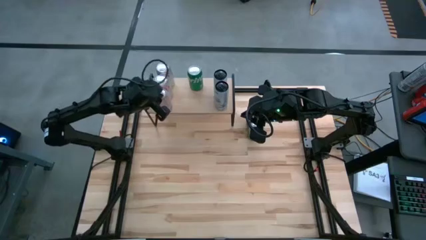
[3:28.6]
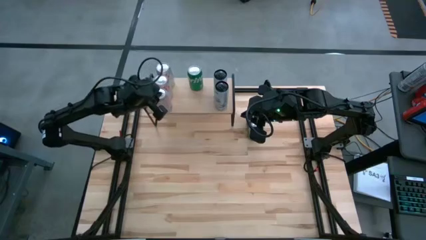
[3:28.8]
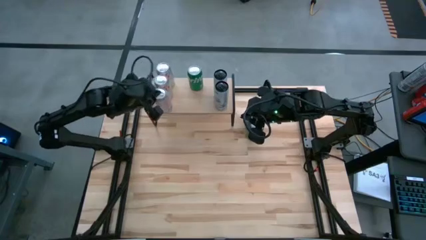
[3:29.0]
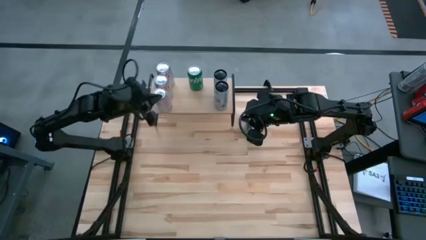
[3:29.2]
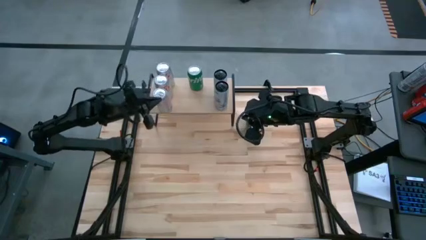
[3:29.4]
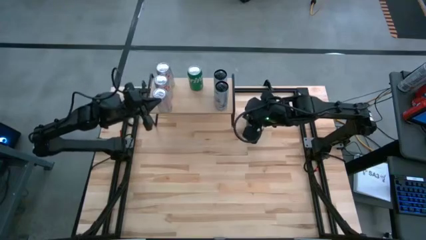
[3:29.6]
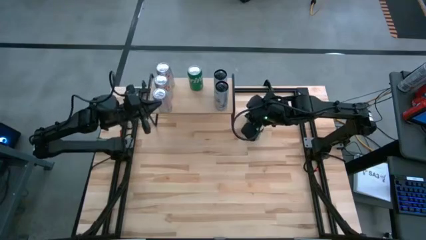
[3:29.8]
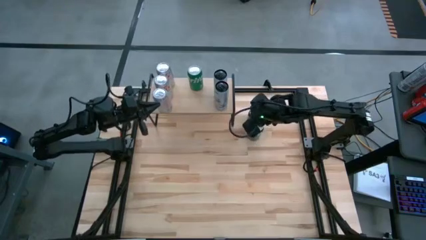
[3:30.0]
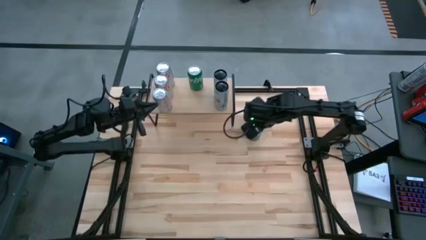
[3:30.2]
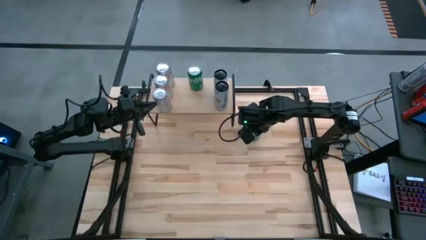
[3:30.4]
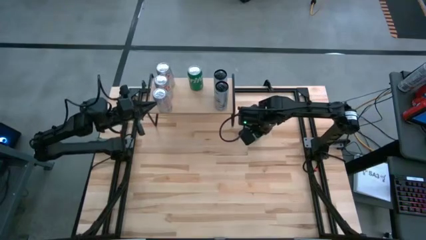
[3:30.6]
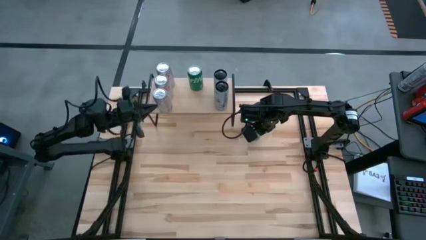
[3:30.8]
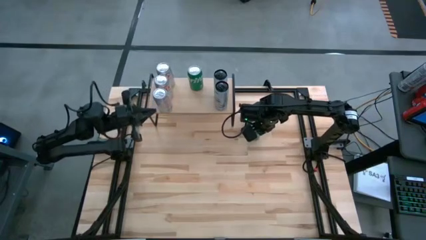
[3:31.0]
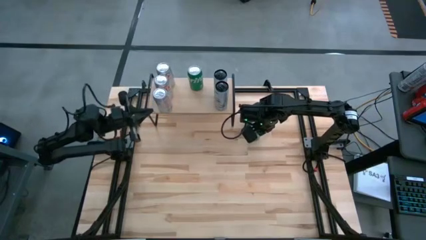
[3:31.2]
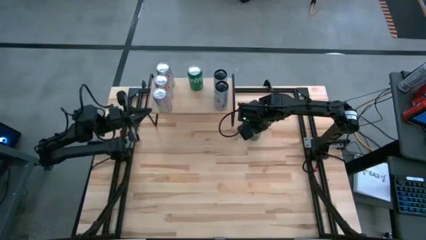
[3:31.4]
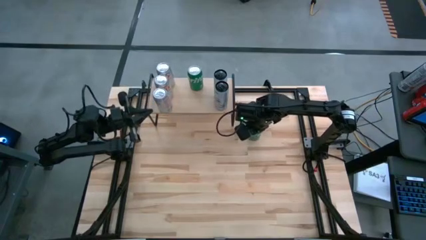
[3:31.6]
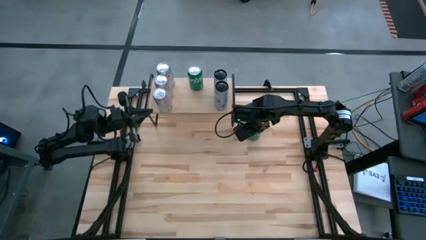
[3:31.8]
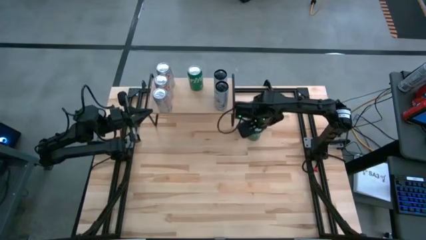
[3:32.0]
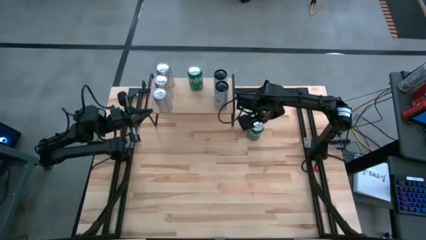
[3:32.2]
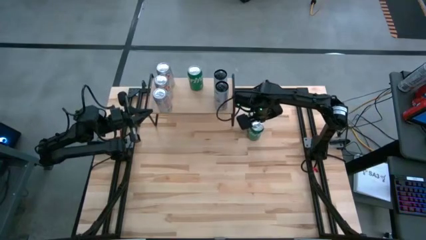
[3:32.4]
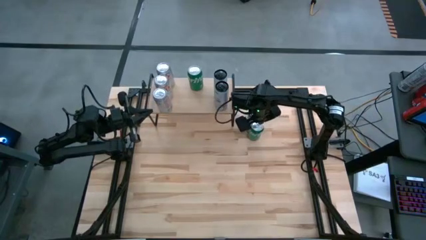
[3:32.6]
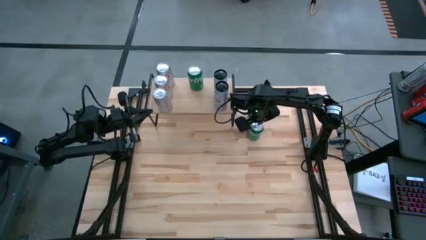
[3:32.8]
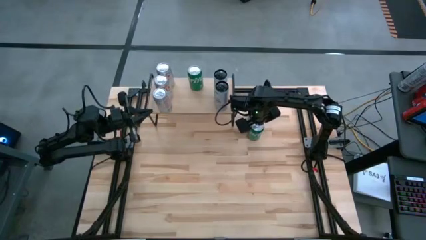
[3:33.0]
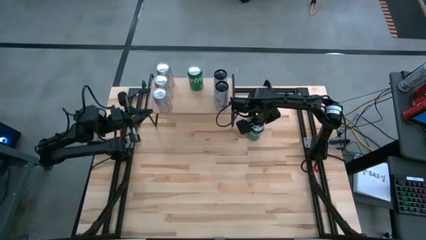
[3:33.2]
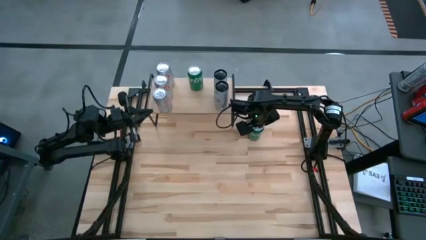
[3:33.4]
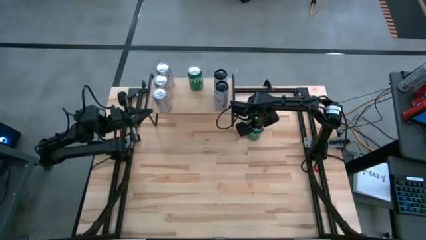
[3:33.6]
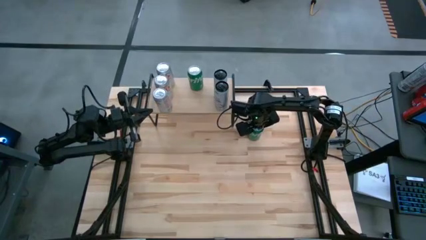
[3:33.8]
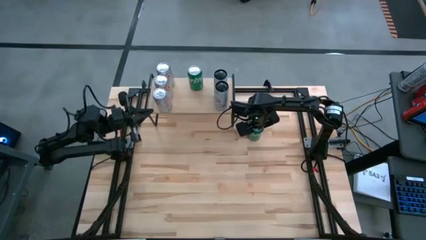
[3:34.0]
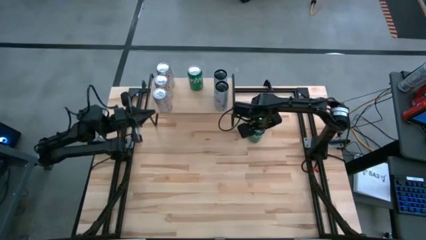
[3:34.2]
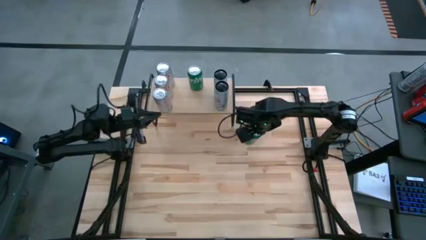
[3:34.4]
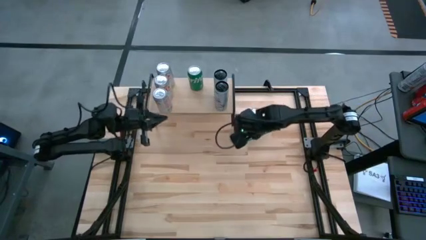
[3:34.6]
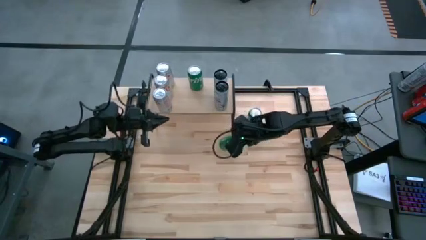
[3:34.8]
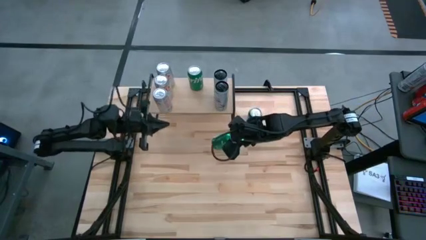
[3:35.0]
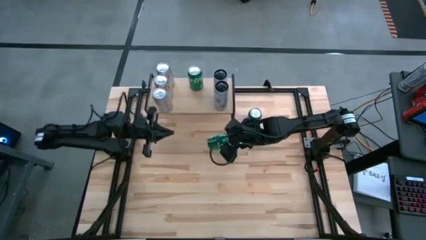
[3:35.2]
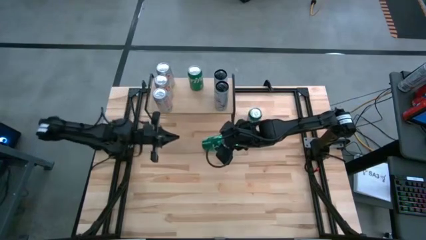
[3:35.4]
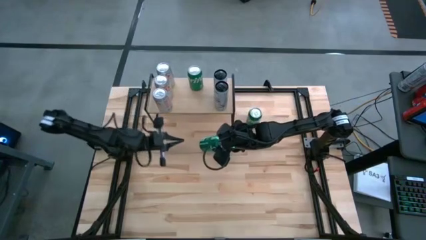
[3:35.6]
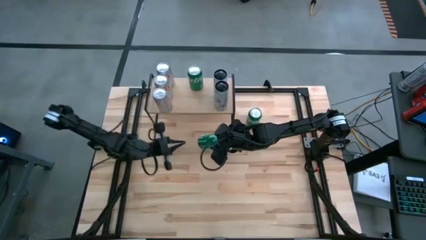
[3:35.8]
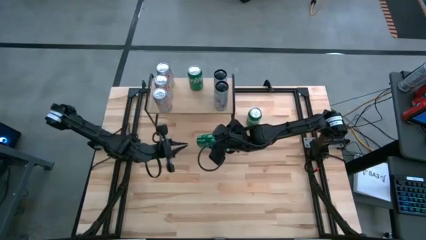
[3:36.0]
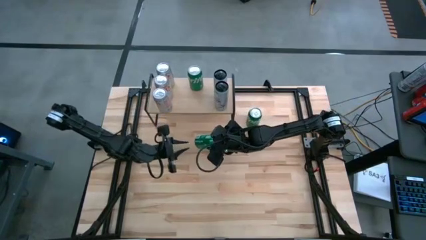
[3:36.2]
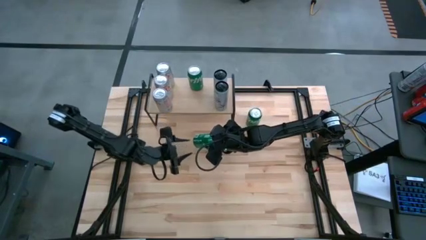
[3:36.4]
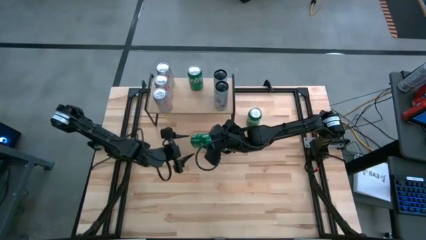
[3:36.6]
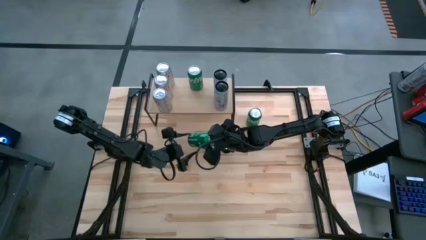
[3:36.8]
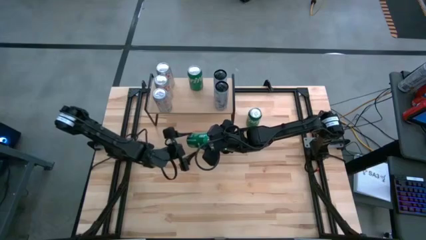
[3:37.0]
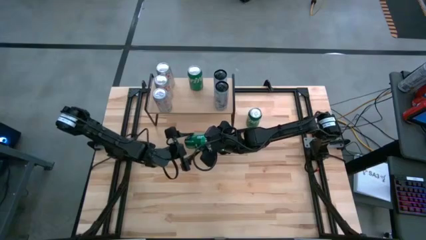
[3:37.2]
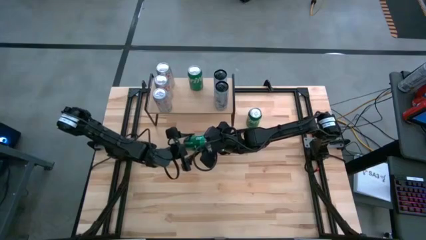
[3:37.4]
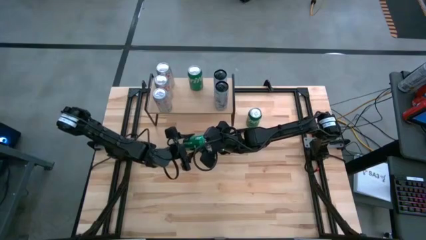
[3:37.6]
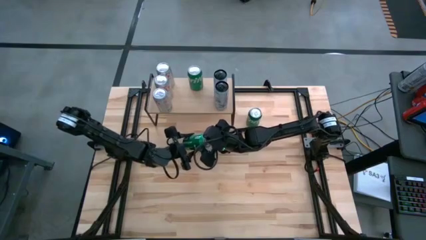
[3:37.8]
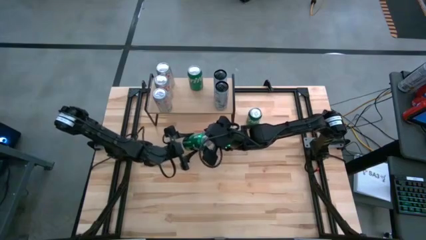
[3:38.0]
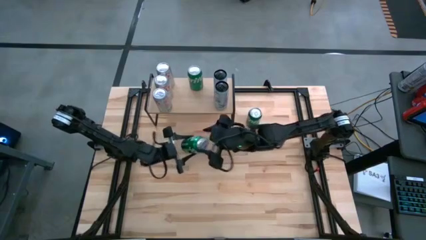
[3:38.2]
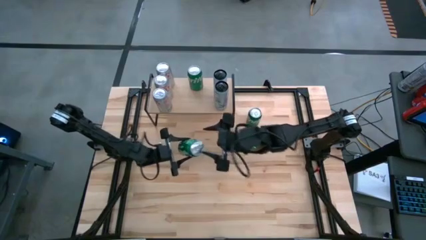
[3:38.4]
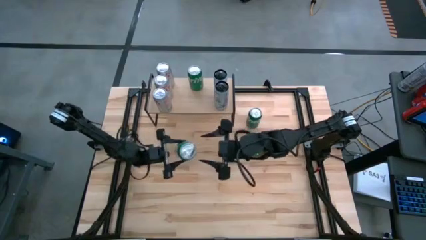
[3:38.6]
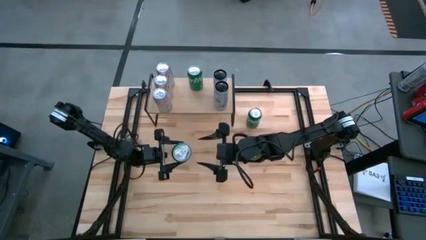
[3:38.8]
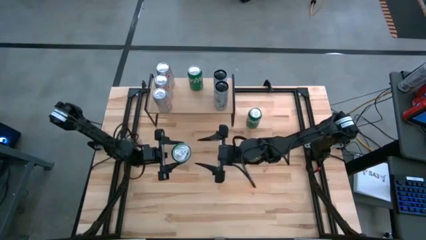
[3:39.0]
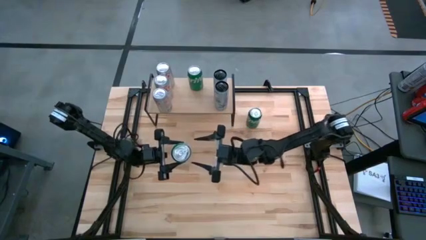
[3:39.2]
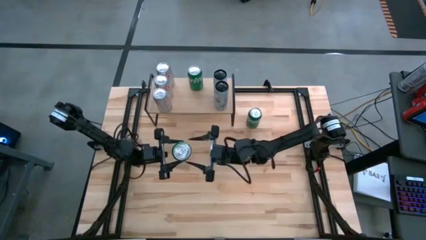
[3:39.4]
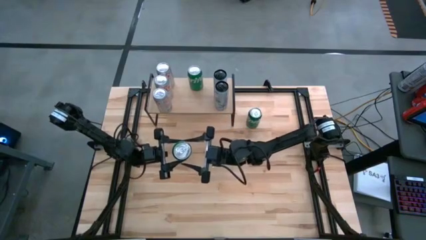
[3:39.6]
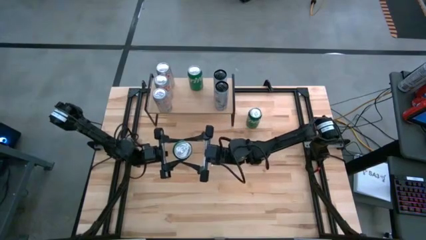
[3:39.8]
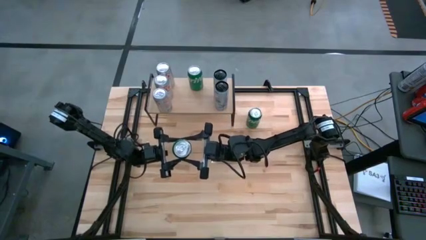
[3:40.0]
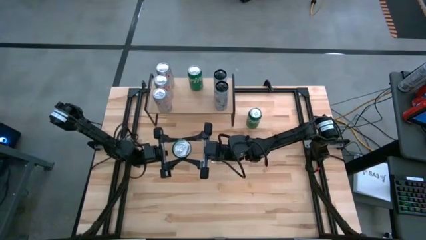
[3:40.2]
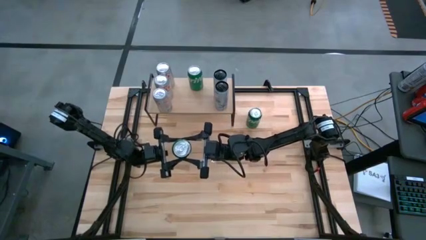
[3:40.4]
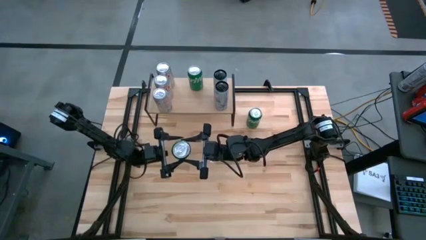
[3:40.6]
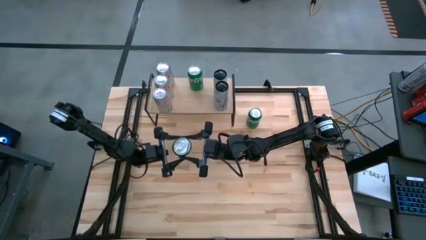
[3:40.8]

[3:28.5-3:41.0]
Task: Place canned beverage on shelf
Put the bottom green soda can aligned with the other soda cans on the shelf

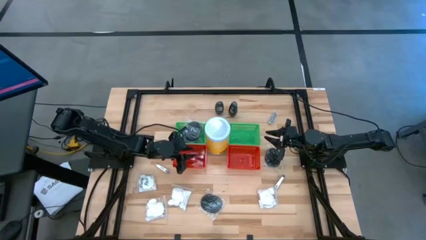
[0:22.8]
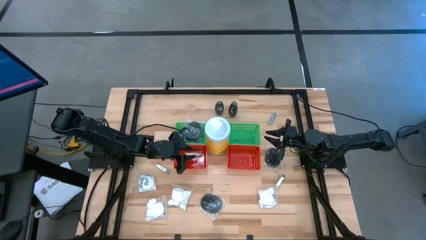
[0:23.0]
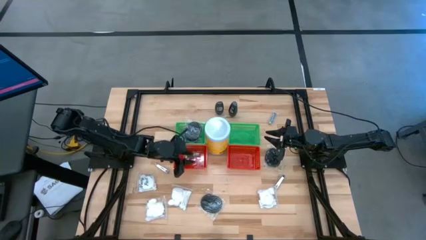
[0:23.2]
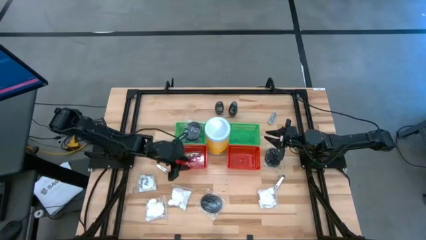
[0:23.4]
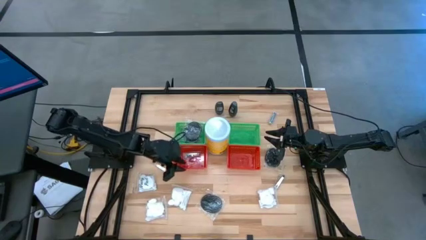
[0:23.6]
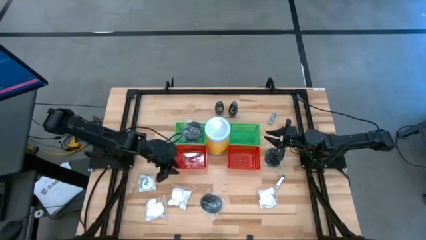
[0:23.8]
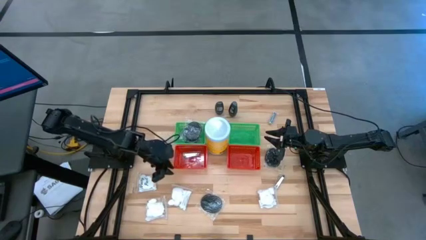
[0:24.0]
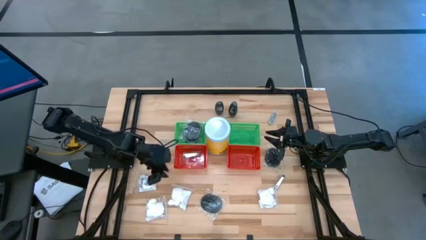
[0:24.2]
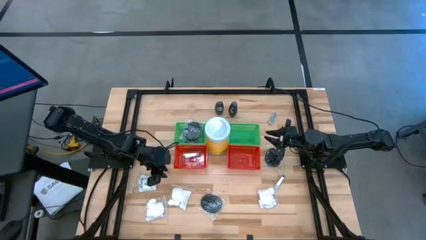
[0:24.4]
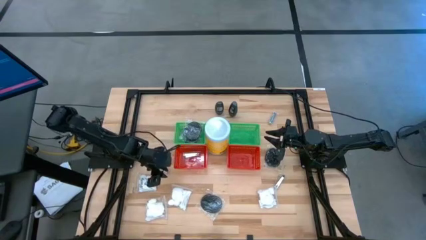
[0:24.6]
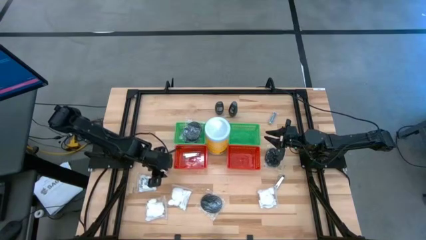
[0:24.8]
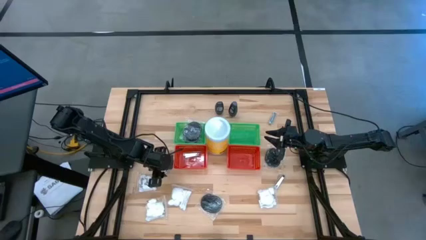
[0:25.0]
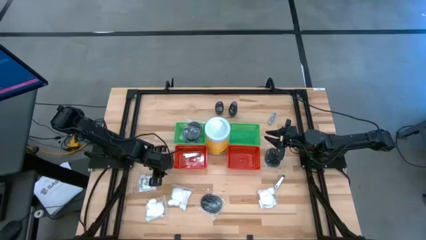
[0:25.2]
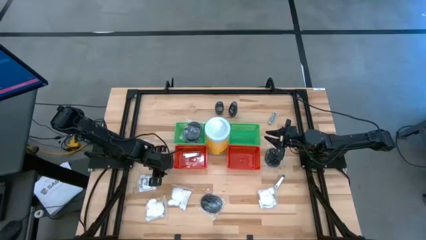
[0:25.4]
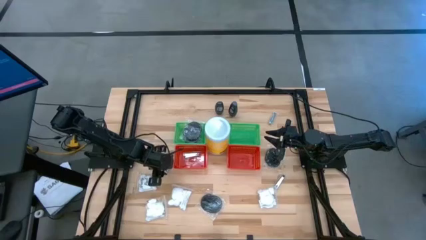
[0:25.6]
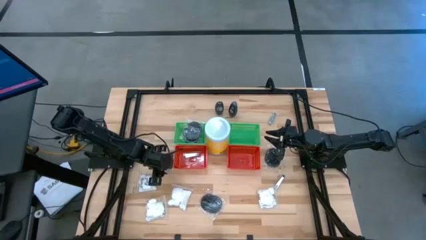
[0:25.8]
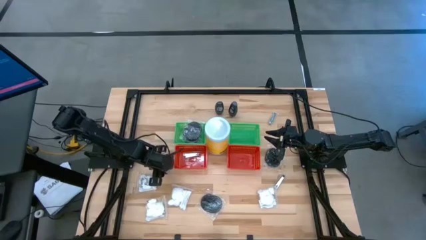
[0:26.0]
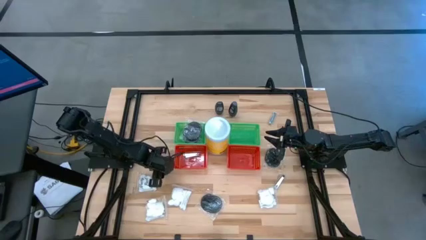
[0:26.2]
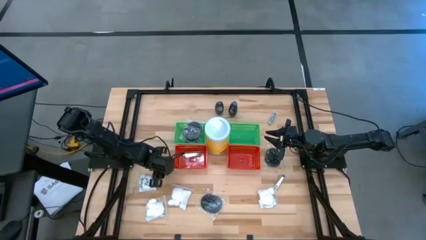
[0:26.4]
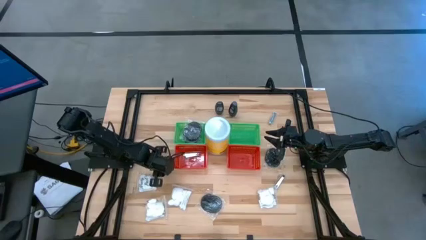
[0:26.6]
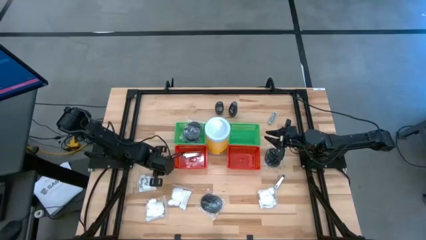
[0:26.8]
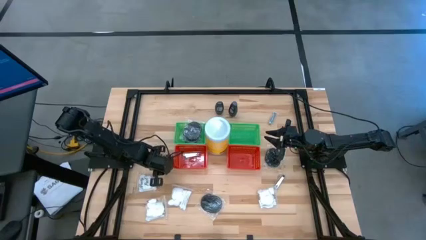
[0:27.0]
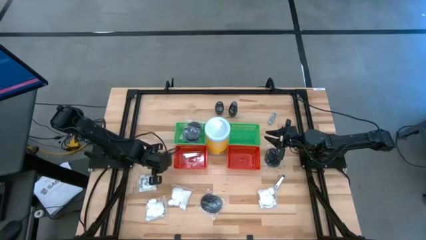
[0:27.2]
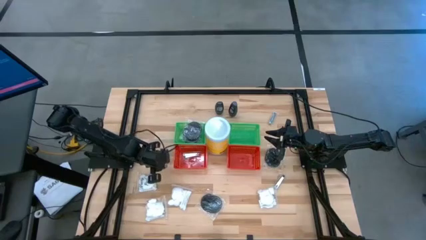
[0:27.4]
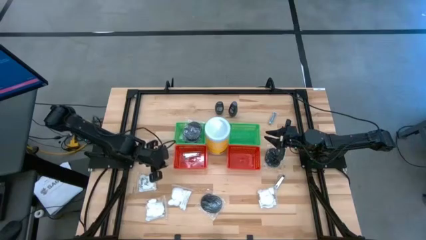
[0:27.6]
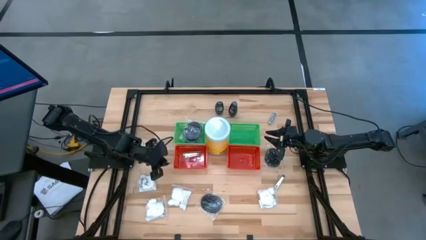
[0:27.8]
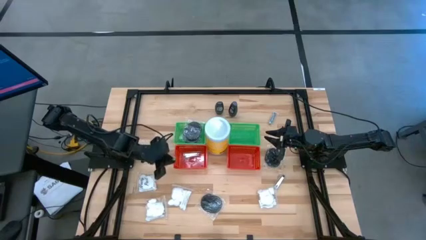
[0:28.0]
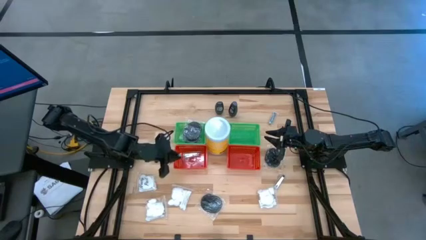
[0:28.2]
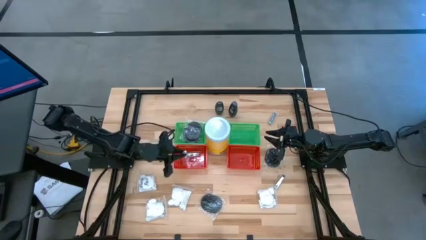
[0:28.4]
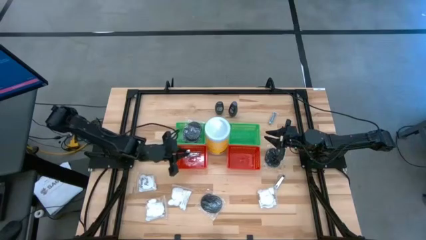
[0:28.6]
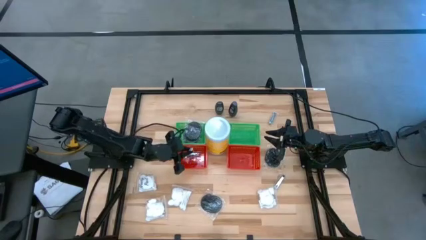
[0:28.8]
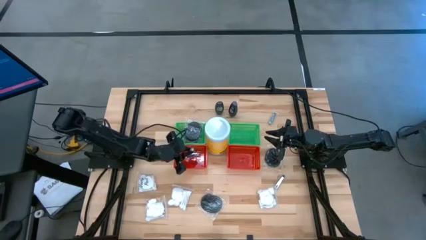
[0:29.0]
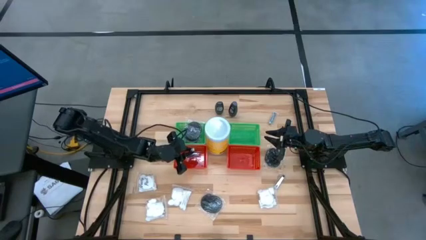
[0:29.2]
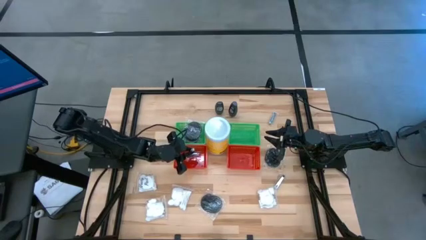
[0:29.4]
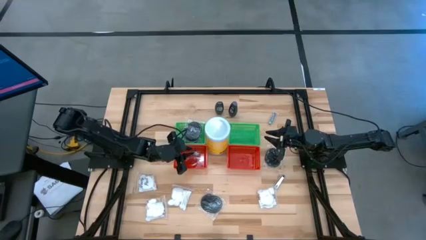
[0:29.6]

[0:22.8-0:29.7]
Task: Pick & Place Travel size toiletries
Put the left nail cutter into the left red basket
